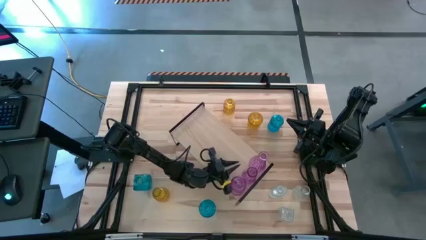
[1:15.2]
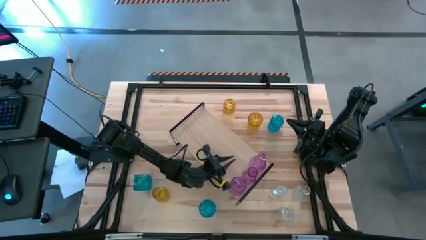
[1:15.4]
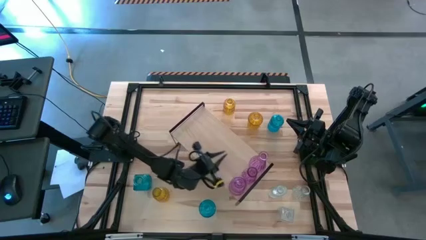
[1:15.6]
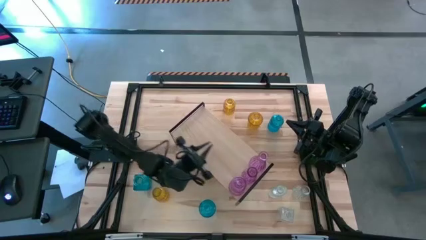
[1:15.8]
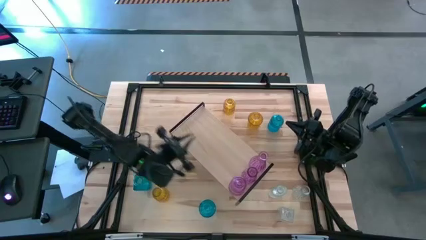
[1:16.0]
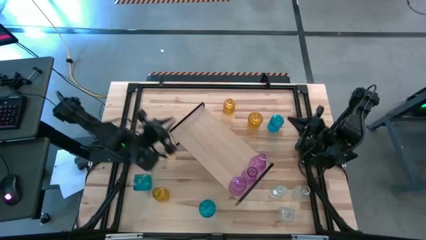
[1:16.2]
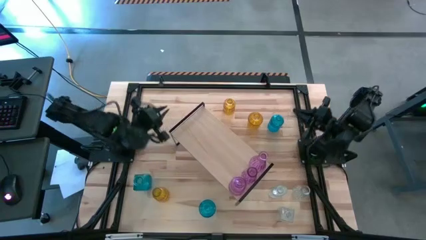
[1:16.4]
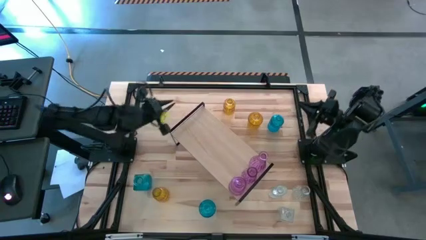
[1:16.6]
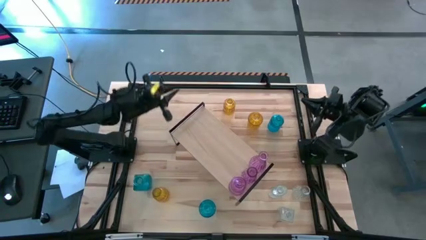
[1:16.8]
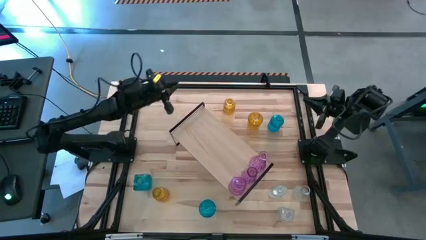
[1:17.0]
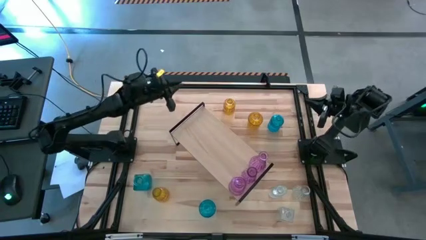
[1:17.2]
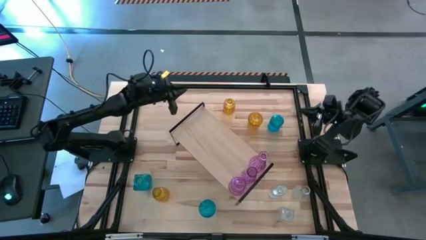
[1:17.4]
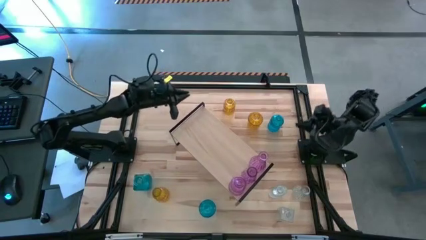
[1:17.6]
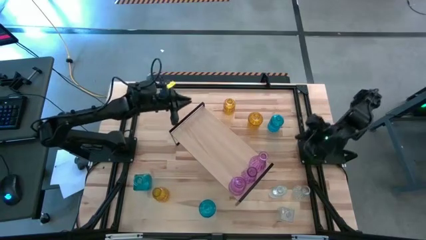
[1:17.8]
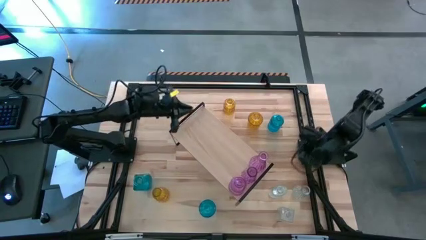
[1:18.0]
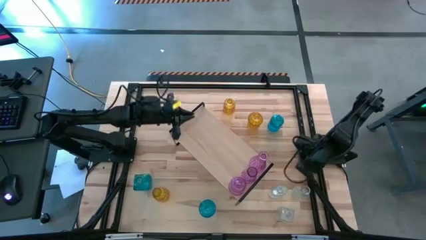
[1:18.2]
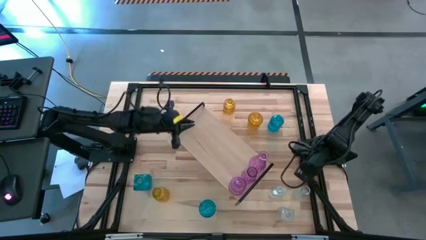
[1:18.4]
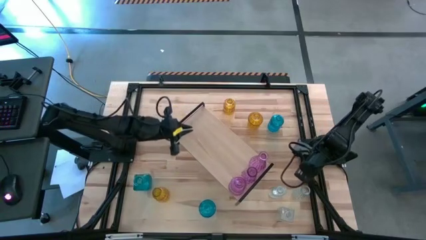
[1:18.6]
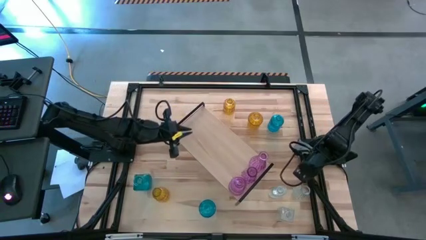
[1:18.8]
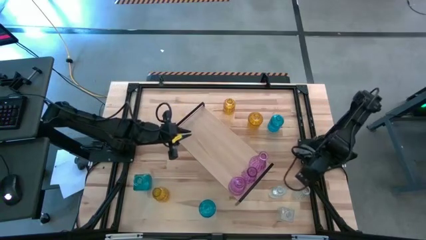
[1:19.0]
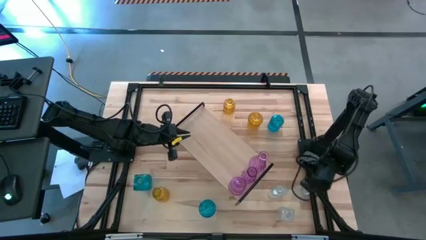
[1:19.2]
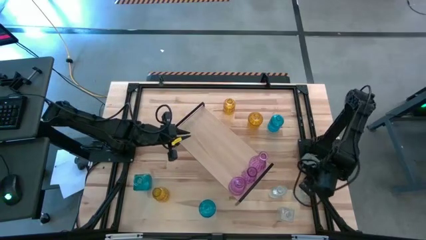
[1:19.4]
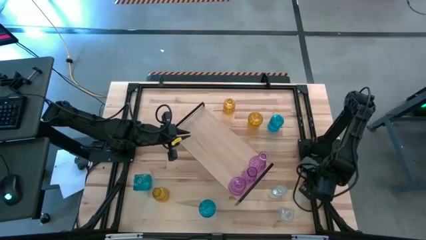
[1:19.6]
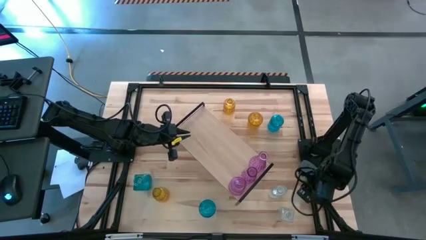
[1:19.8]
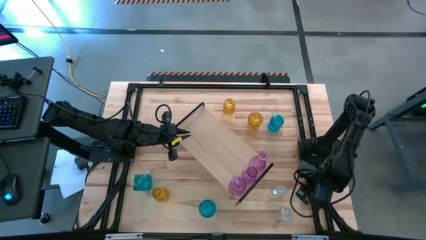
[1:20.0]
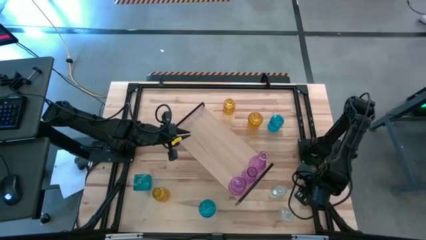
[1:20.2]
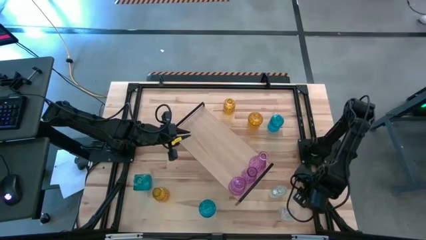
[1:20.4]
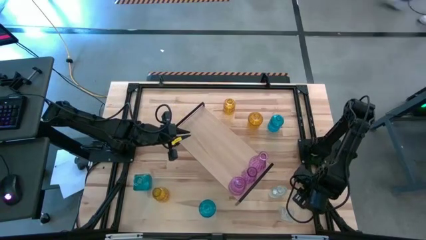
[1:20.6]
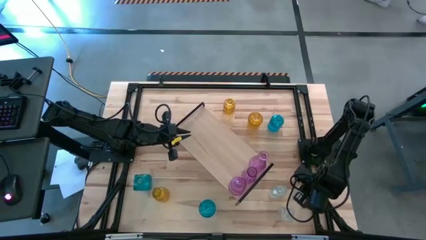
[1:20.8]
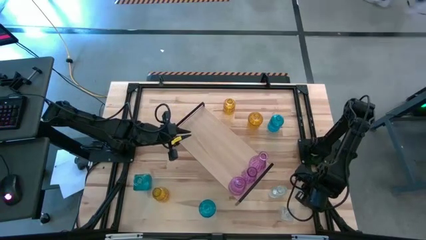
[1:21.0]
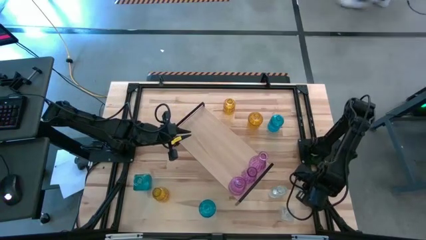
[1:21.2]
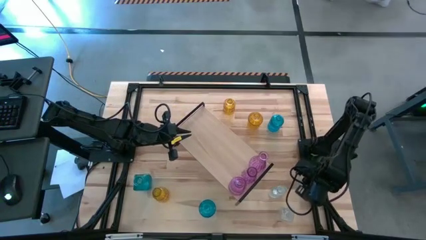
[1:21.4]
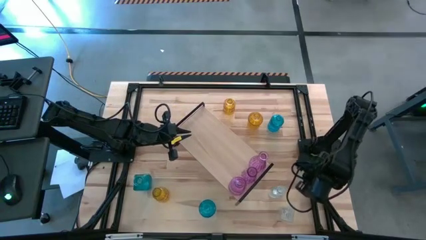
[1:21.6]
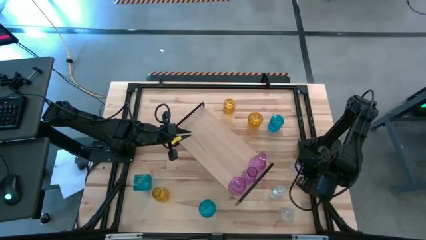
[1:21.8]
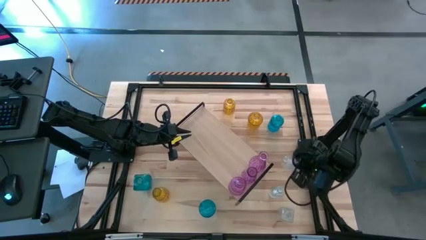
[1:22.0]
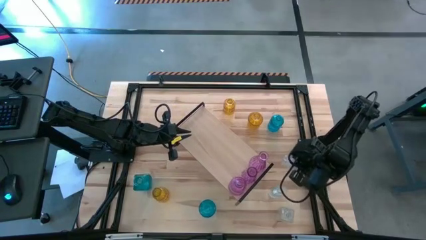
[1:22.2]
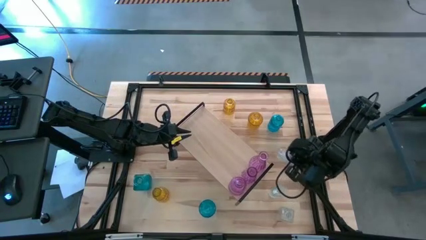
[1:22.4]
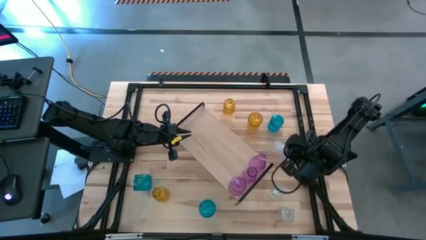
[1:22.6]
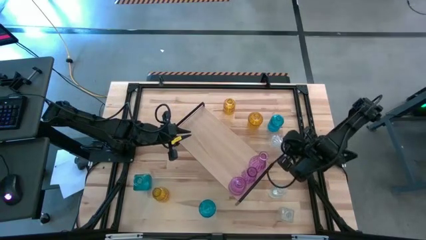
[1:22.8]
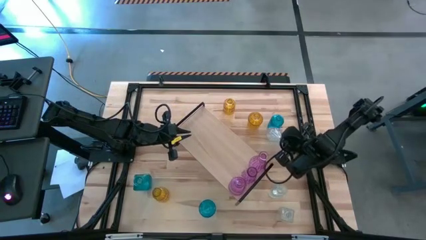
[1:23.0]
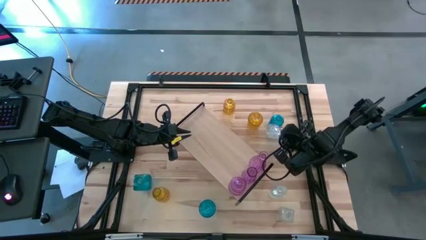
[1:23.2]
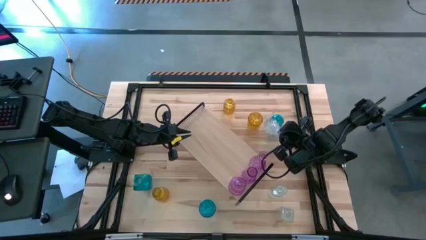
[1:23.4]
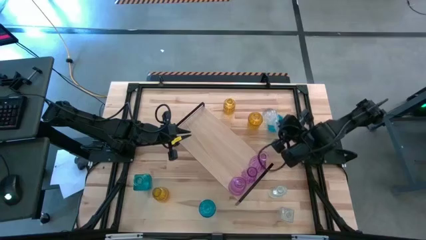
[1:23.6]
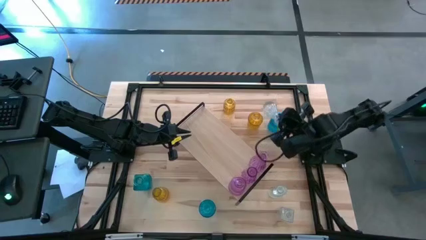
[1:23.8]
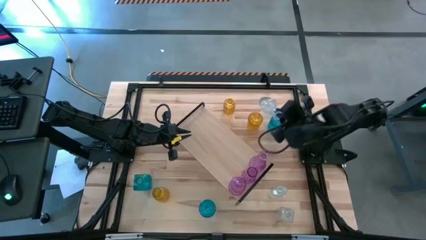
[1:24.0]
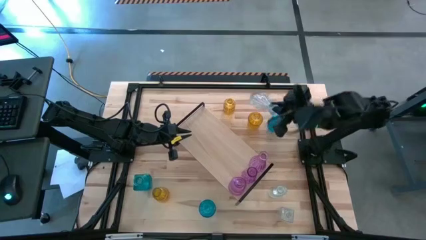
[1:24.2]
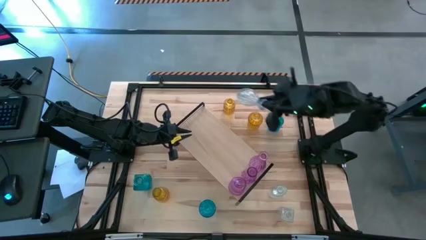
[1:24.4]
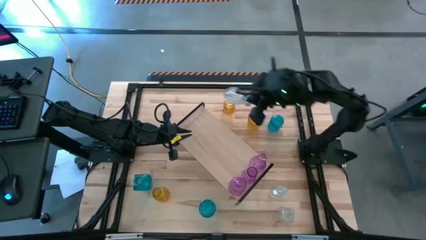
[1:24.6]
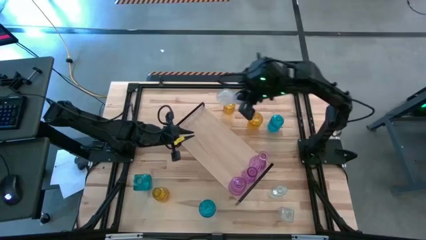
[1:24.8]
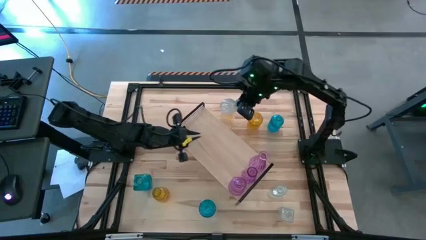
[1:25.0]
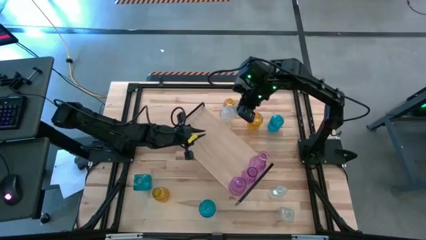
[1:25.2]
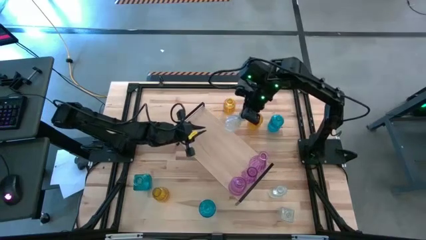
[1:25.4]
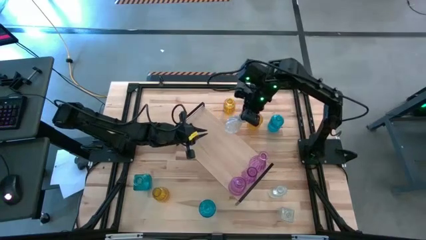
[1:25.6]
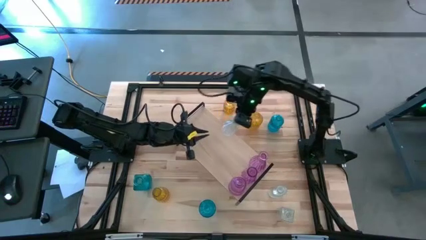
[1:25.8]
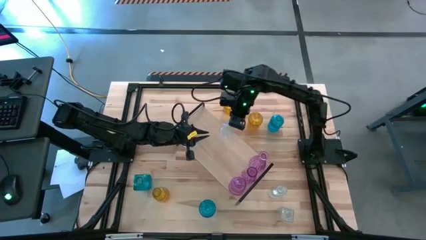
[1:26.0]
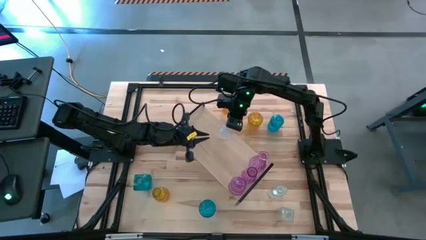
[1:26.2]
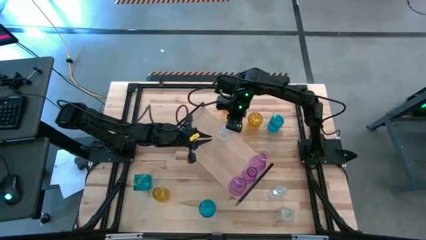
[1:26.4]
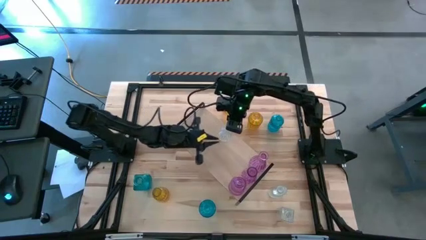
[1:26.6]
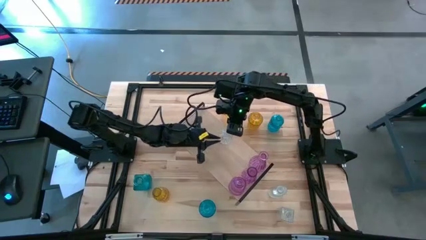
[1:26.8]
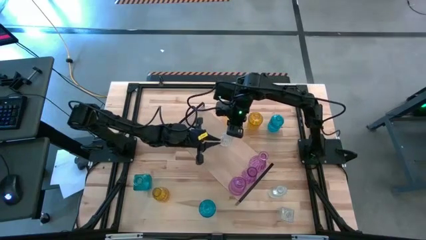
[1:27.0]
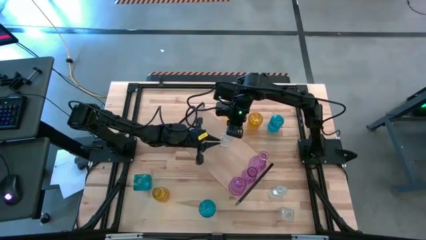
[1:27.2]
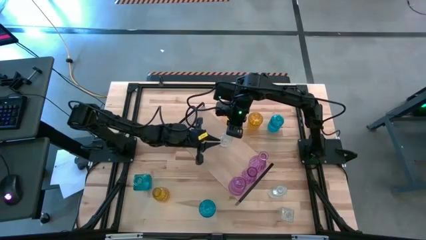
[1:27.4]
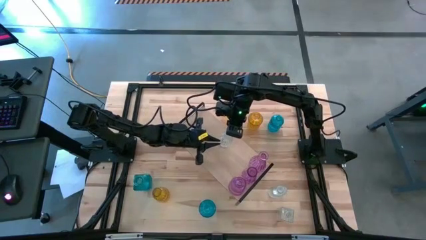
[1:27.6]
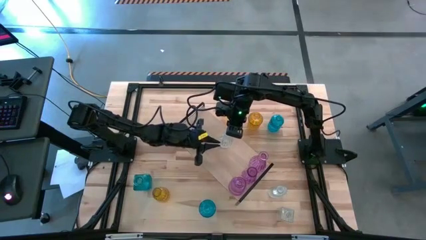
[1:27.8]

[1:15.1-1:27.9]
Task: sort vases onto shelf
Put the right transparent flower vase on the shelf

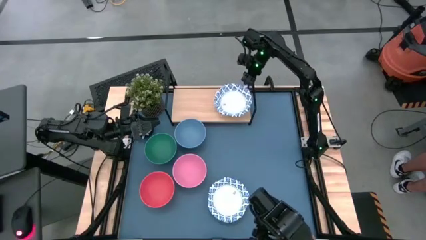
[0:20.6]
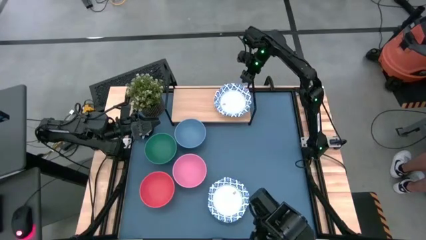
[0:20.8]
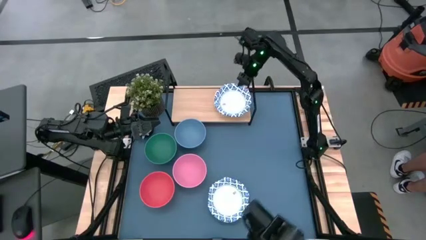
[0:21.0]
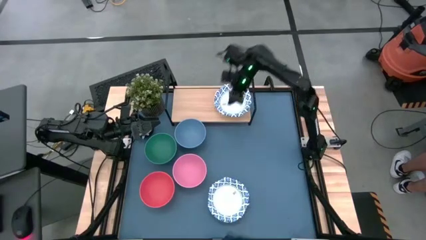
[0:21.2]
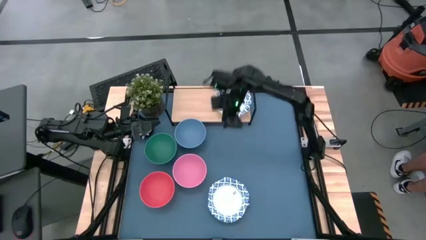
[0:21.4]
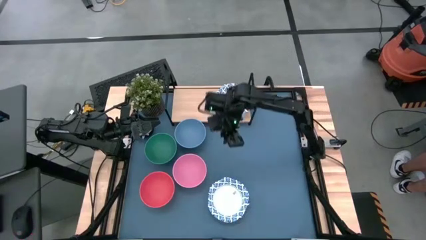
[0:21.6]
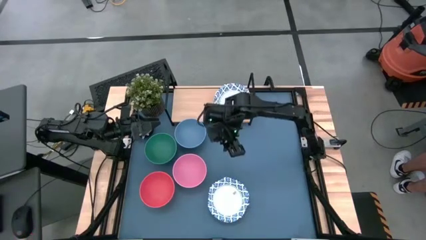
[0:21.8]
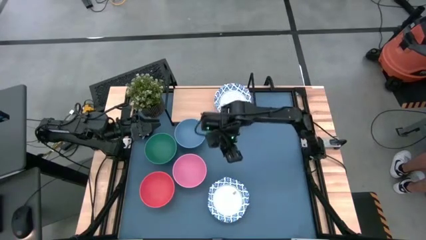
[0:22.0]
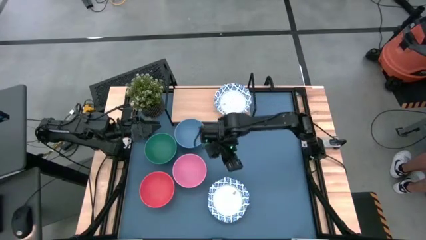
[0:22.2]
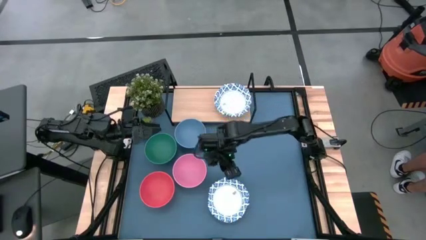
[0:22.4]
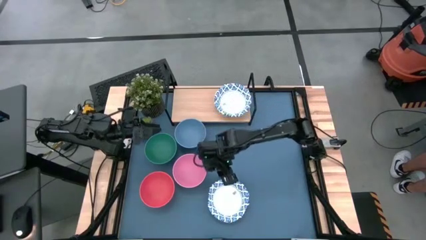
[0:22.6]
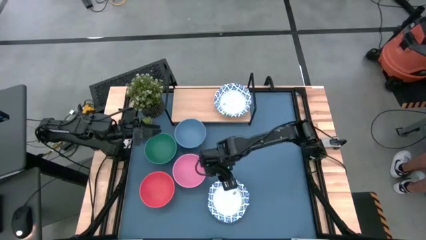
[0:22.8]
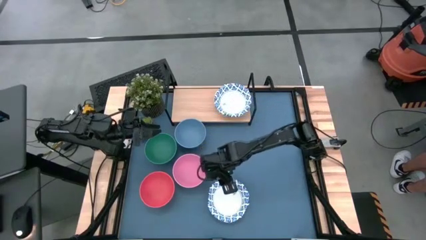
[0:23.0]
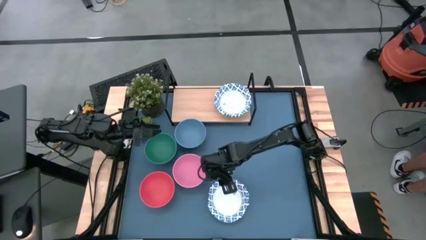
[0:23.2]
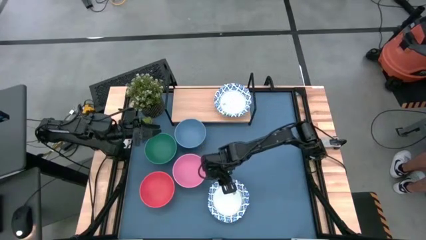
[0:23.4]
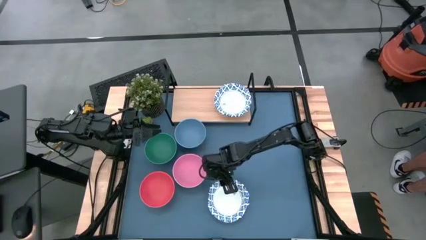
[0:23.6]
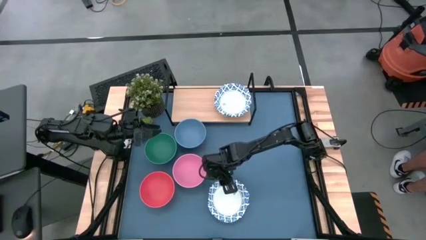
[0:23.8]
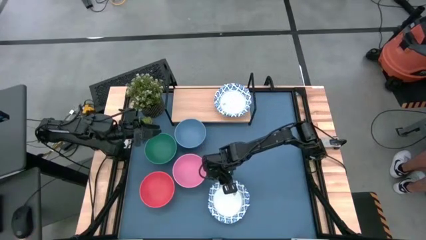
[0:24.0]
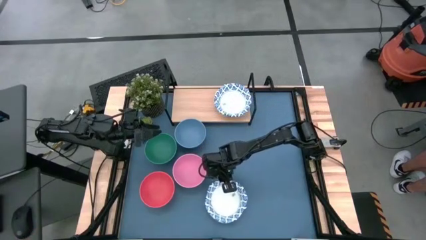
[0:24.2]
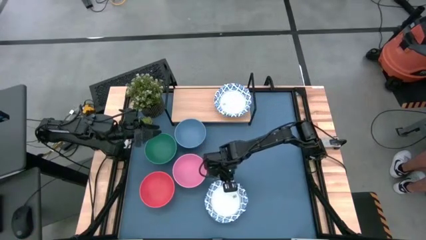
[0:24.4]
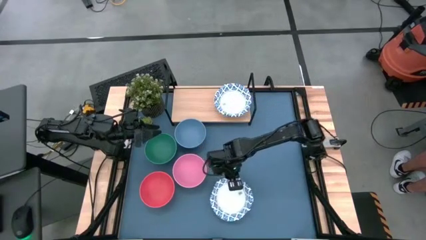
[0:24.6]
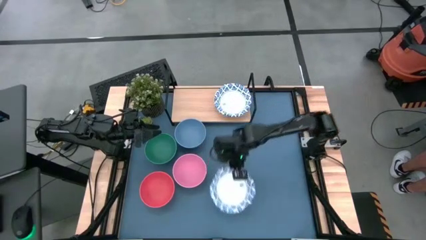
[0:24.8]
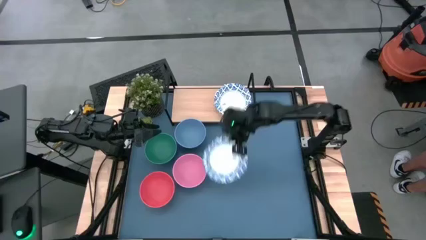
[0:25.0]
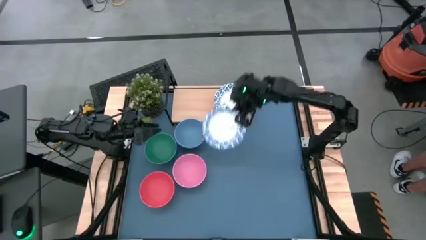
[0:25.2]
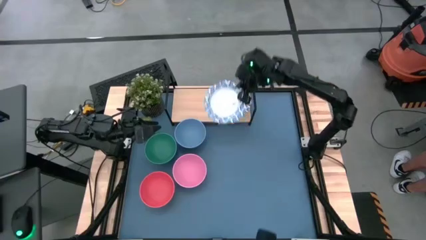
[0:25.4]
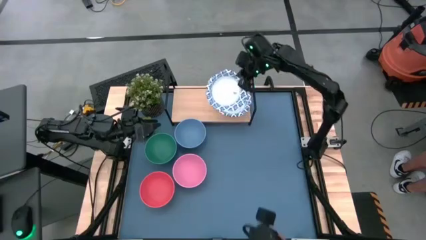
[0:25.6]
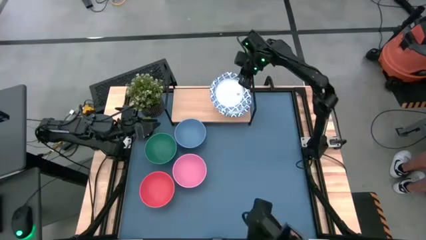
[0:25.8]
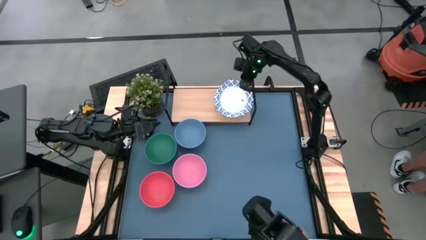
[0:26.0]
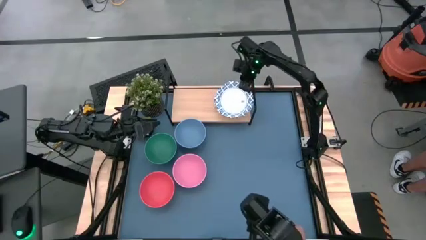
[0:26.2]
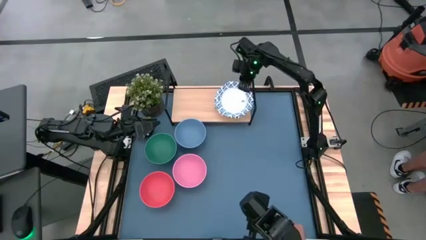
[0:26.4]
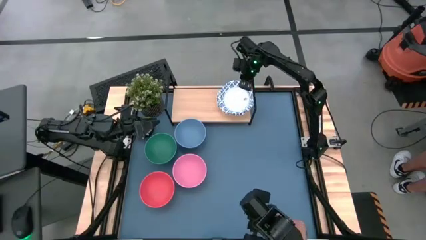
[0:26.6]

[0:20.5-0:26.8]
Task: Place and stack bowls onto a shelf
Stack the white bowl on top of the white bowl on the shelf
